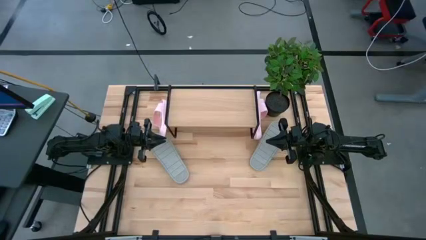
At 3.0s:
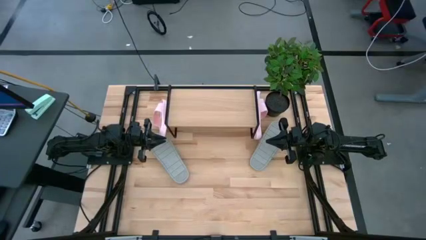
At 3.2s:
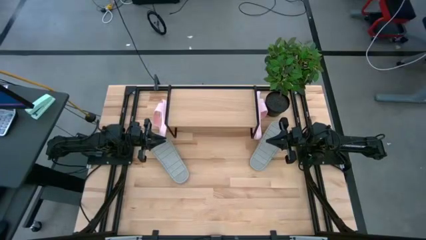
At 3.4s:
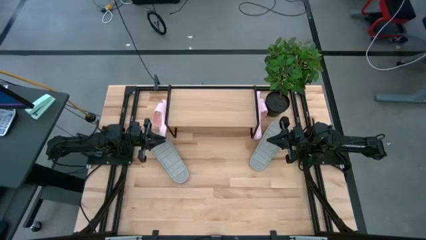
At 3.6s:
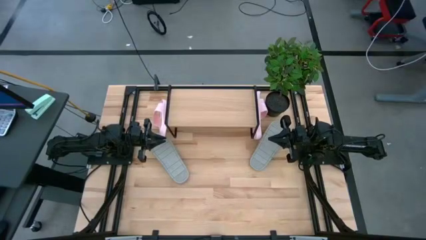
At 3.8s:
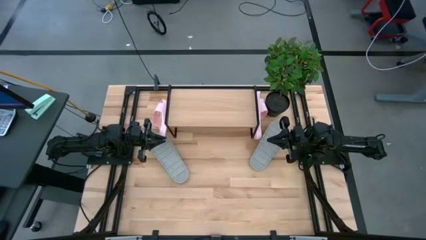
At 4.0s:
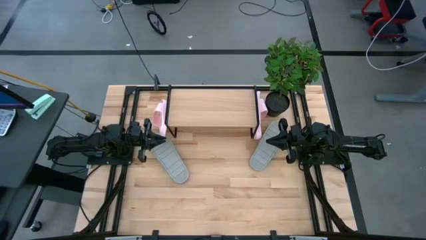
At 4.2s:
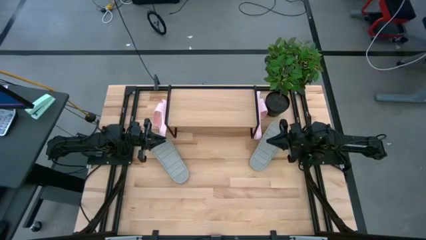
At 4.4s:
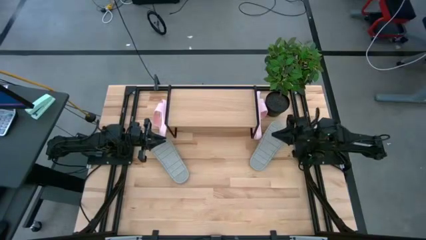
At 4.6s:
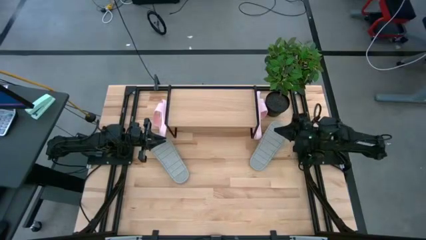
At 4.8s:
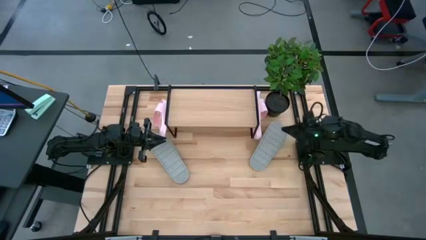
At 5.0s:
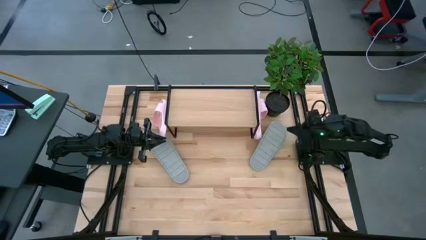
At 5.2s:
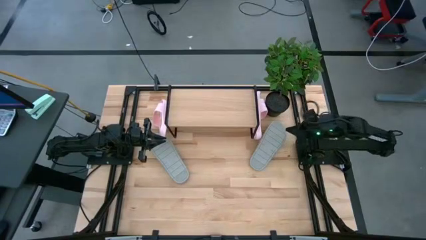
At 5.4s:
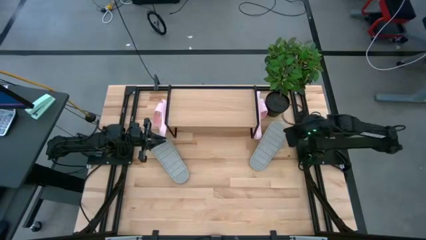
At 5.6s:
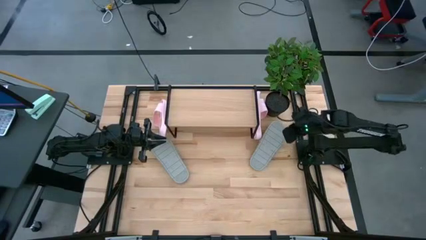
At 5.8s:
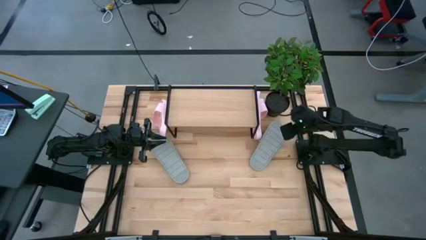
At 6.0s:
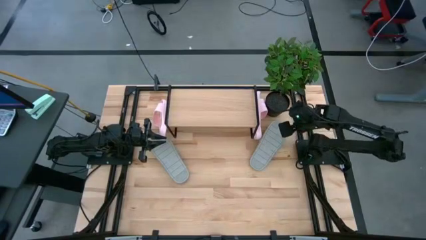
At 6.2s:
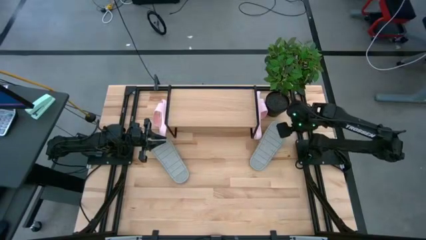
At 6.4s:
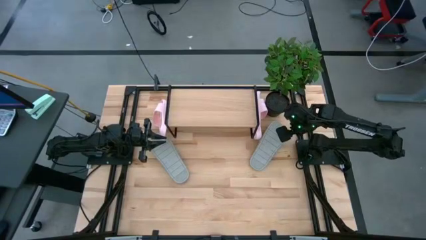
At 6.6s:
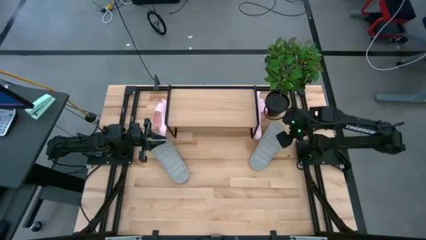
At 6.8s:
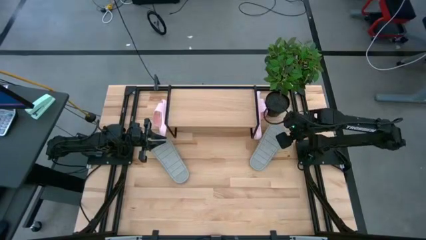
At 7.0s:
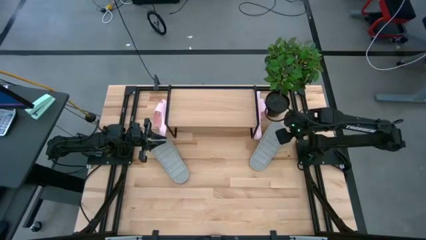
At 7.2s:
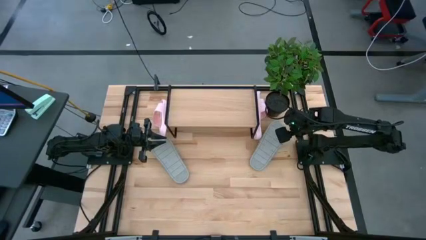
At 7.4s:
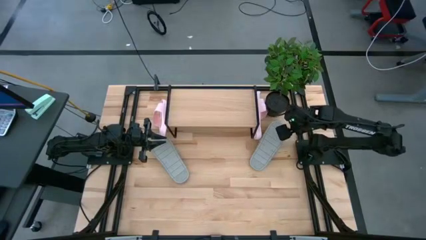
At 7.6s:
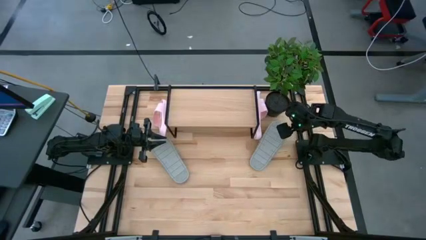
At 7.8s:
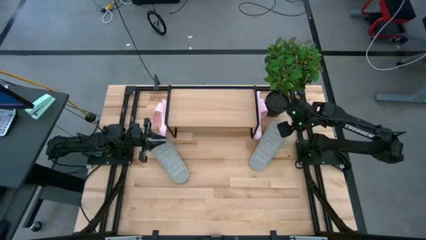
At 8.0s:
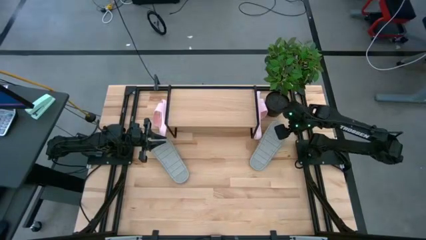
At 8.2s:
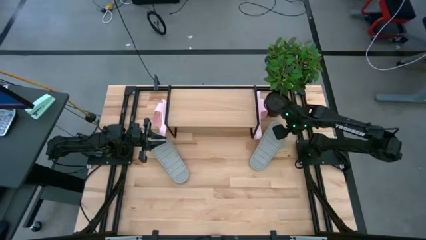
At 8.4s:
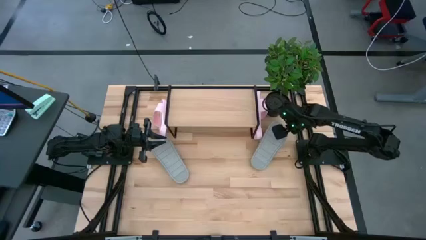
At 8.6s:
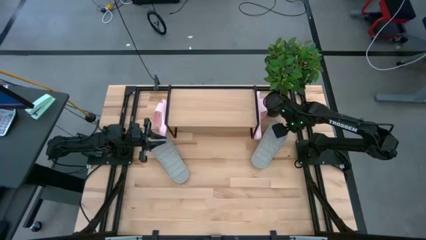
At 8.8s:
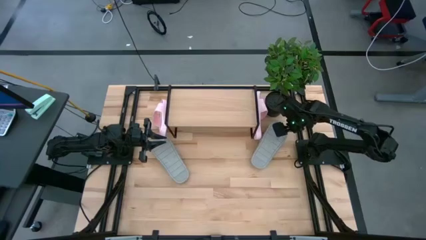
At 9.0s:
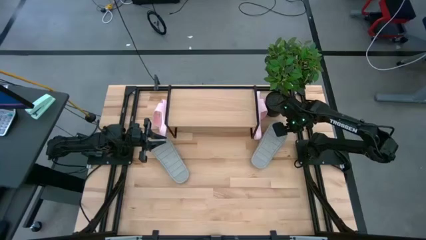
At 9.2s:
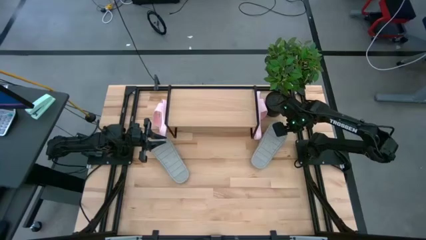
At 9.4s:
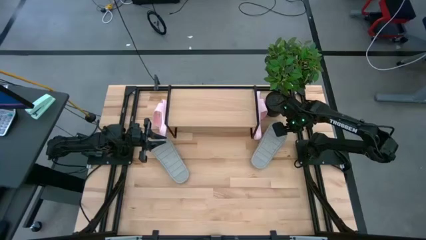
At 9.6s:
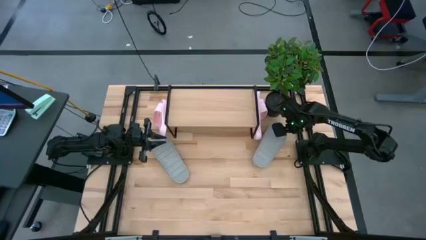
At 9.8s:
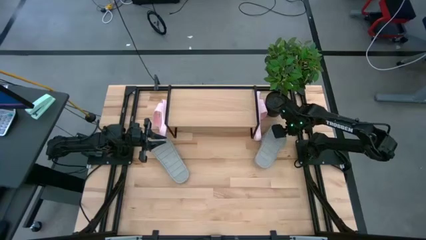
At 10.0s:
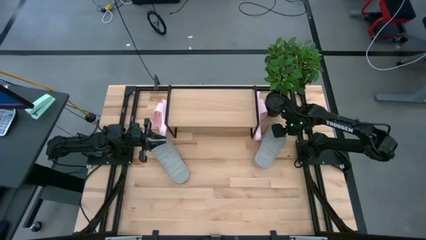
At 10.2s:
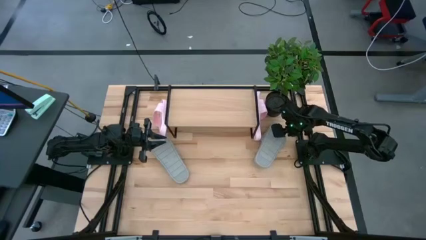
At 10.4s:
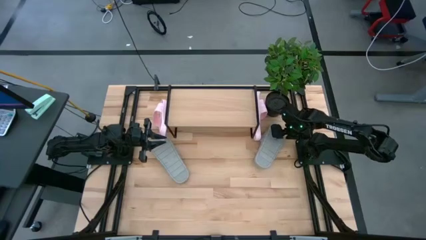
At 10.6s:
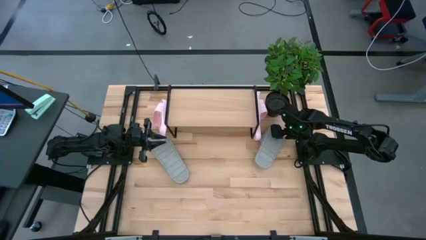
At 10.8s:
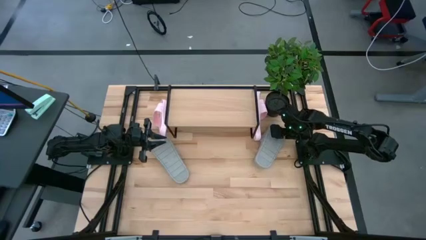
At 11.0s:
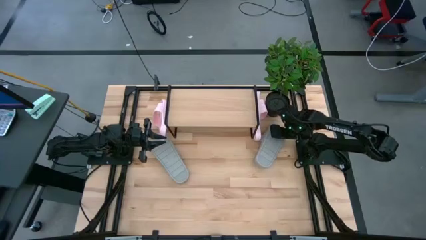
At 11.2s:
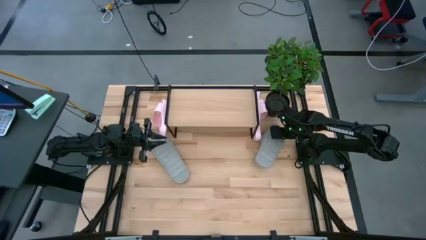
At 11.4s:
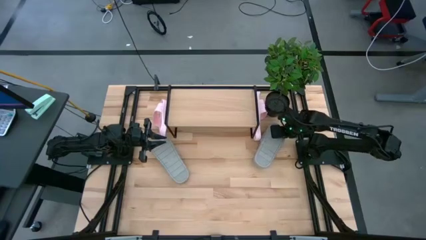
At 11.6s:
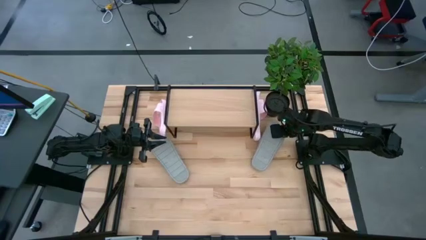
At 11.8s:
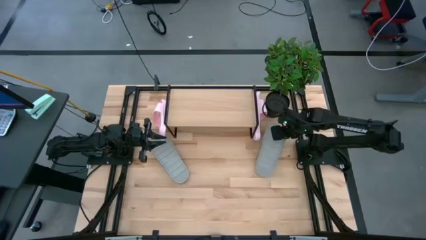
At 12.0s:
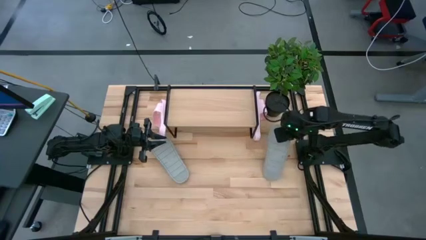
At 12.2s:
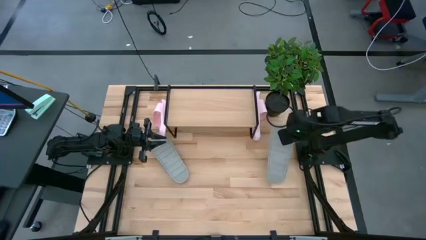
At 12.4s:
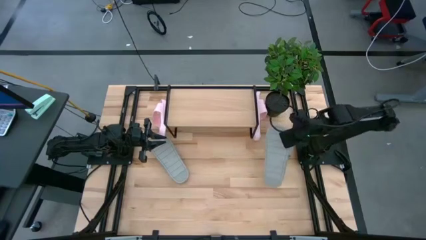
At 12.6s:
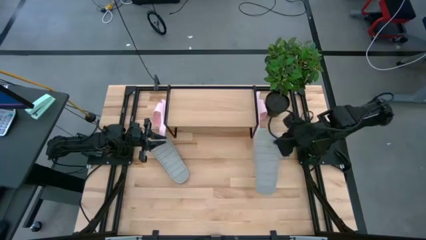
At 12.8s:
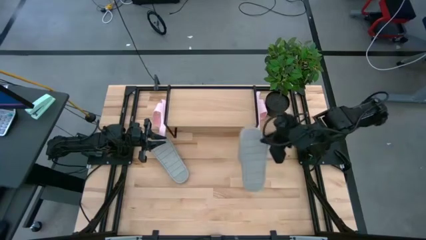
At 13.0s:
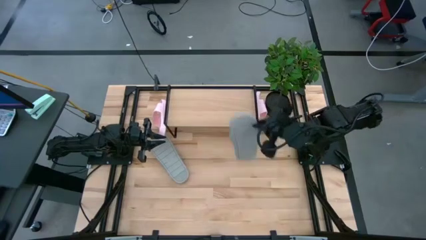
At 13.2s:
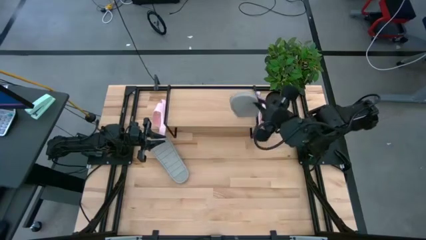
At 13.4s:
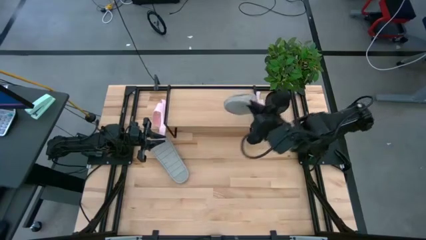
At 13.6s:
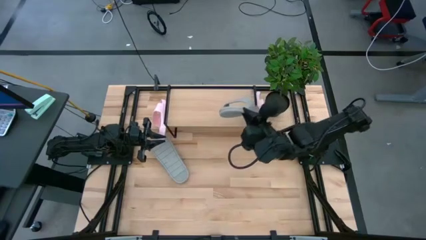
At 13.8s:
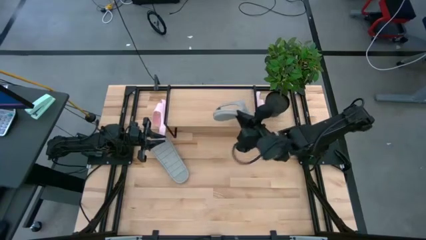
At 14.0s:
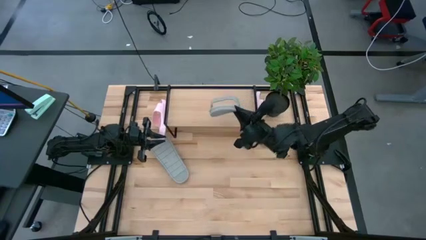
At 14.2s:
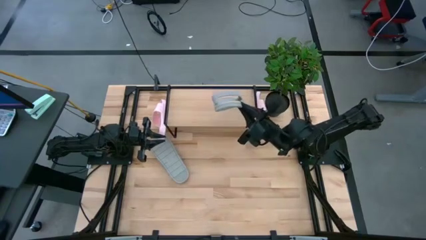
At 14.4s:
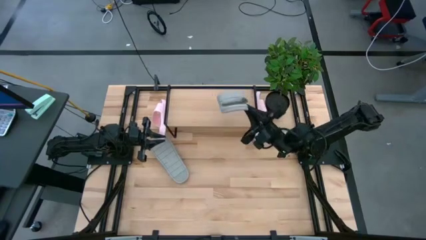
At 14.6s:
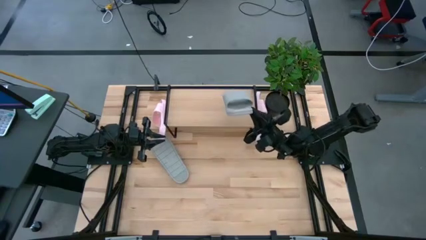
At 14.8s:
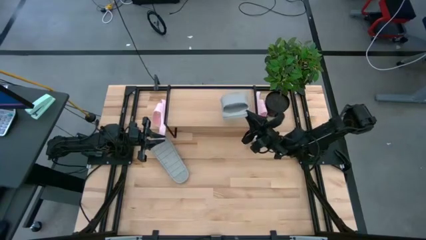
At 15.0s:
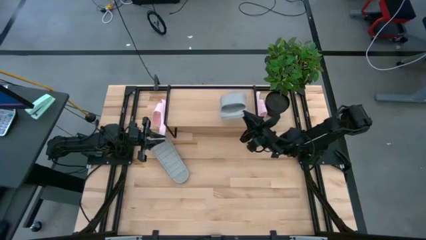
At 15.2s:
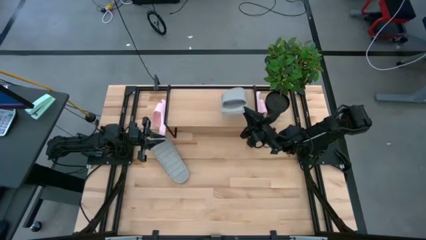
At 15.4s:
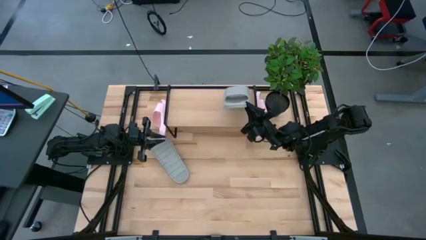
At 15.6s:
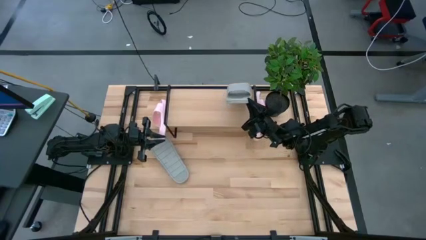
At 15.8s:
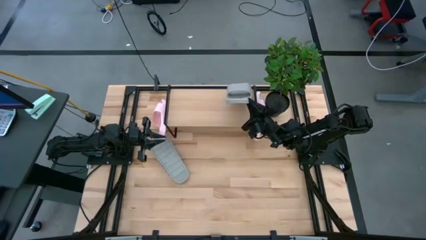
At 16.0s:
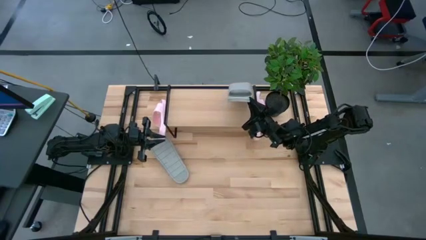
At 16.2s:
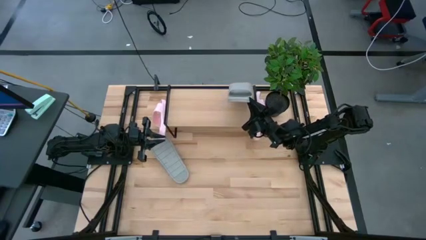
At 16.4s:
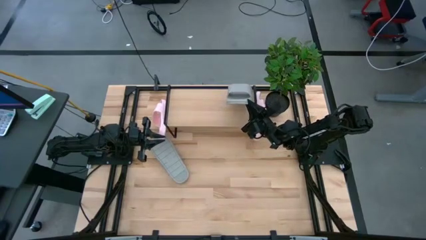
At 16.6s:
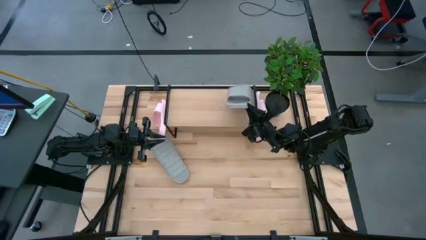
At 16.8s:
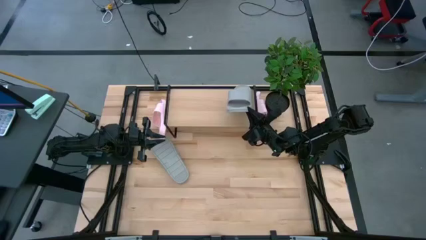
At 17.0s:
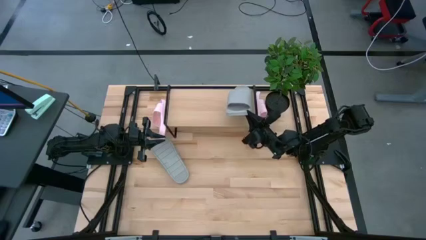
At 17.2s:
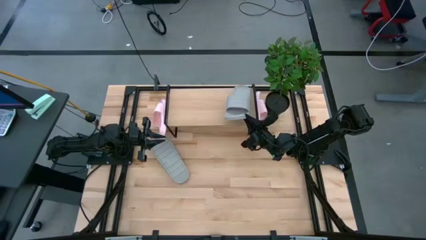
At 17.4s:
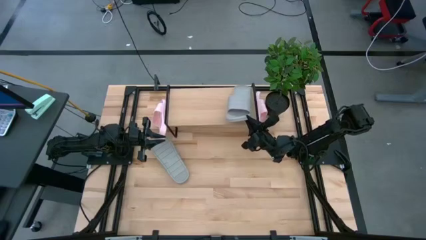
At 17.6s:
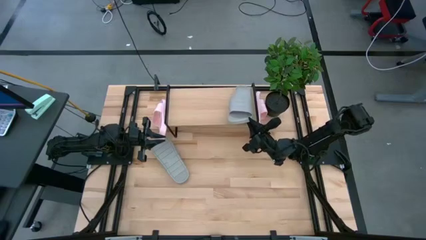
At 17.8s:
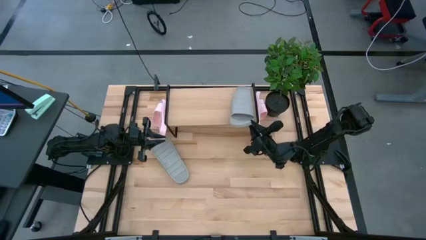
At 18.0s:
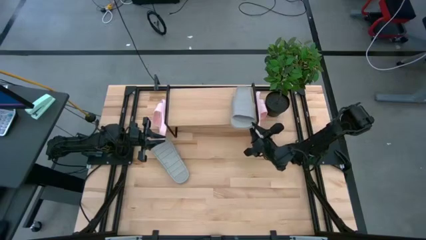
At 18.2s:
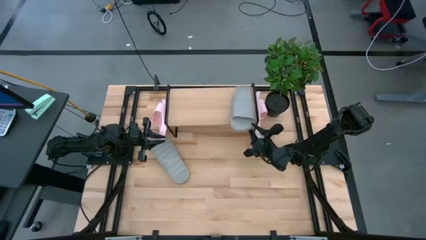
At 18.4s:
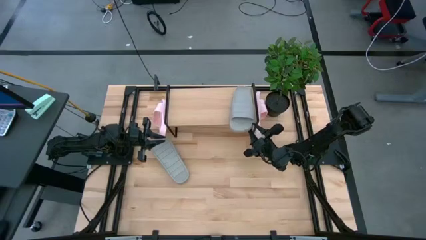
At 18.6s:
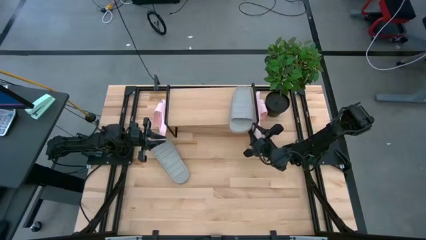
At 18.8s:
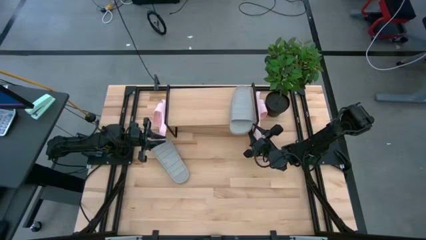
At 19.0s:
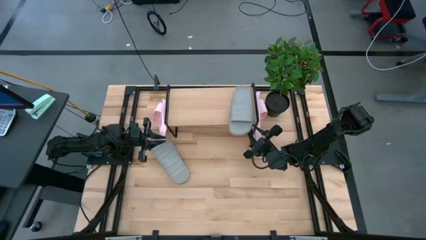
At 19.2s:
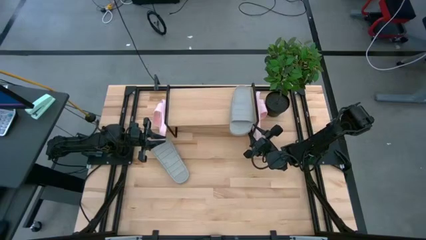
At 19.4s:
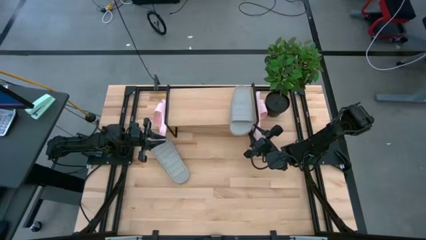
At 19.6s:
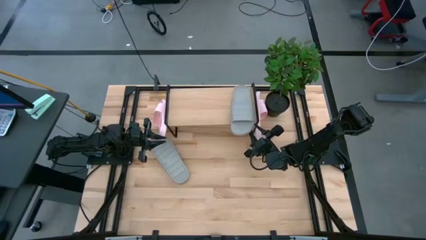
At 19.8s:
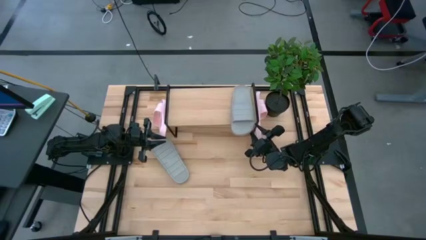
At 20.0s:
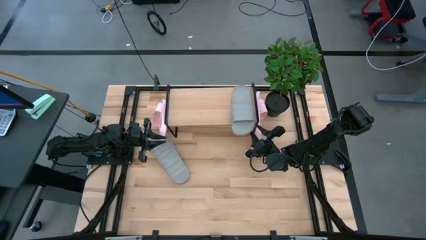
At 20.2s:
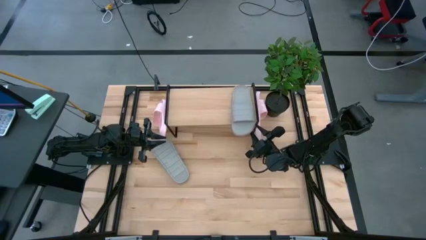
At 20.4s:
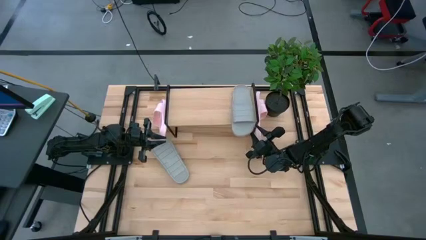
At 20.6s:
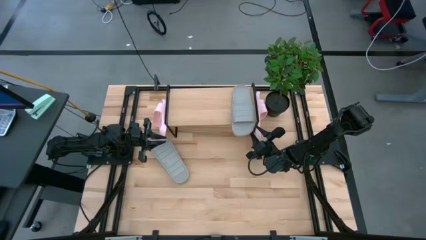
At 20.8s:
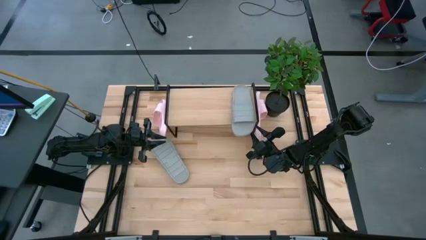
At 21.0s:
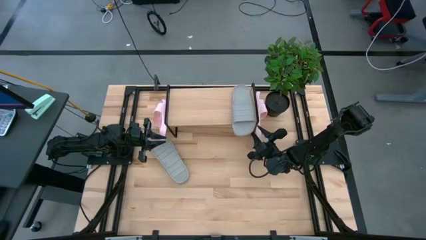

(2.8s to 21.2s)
Task: Pick and place slides into the shelf
Put the right grey slide onto the shelf
